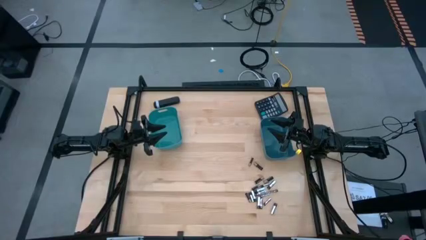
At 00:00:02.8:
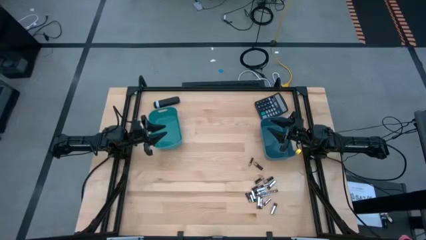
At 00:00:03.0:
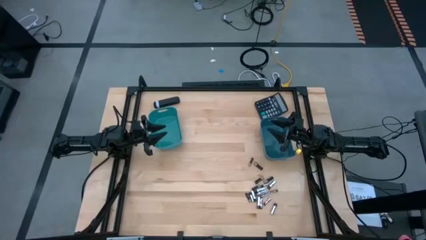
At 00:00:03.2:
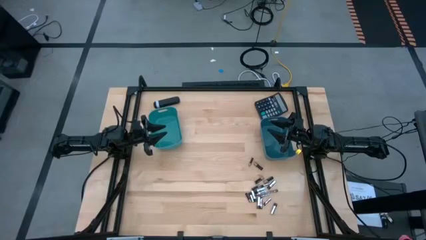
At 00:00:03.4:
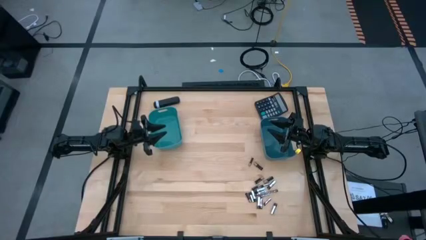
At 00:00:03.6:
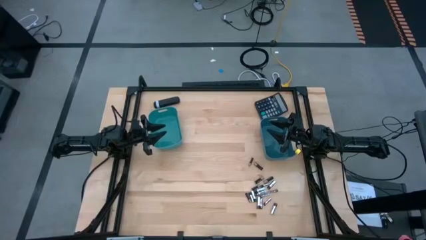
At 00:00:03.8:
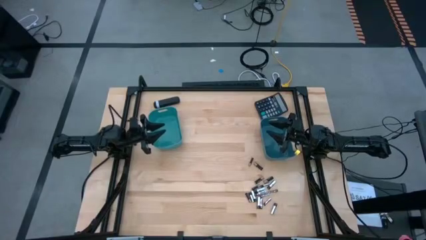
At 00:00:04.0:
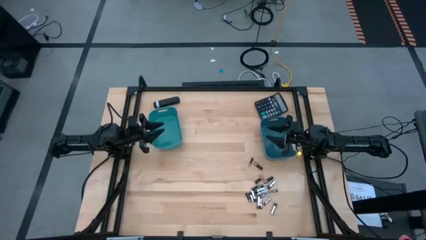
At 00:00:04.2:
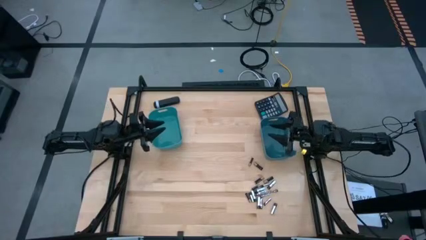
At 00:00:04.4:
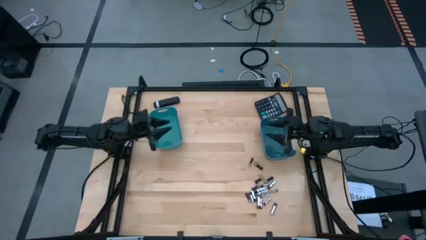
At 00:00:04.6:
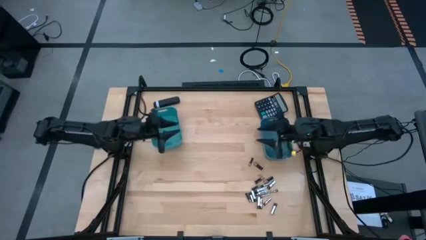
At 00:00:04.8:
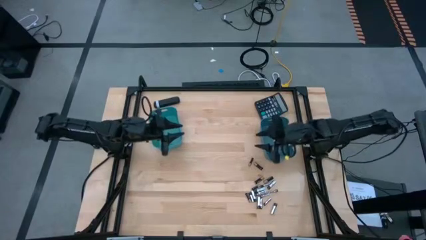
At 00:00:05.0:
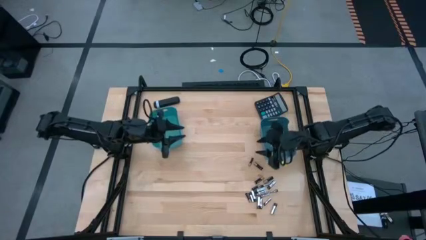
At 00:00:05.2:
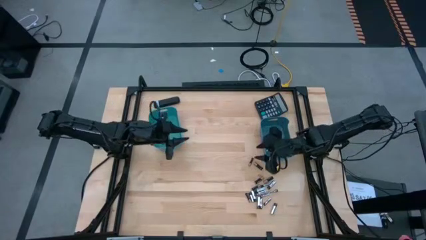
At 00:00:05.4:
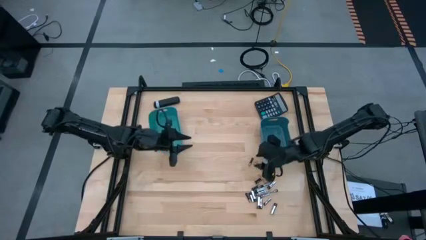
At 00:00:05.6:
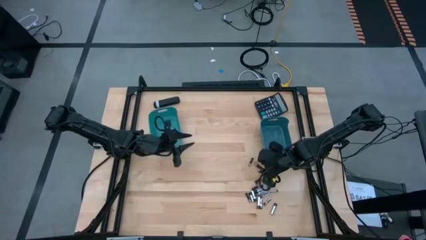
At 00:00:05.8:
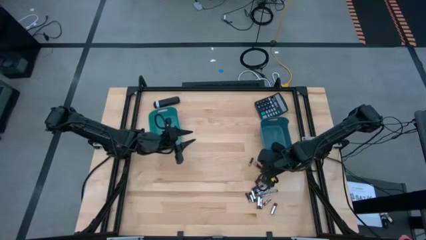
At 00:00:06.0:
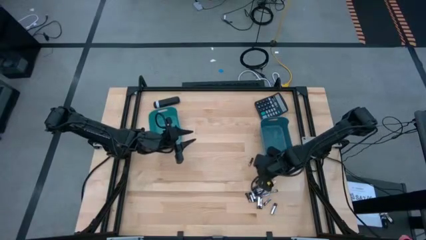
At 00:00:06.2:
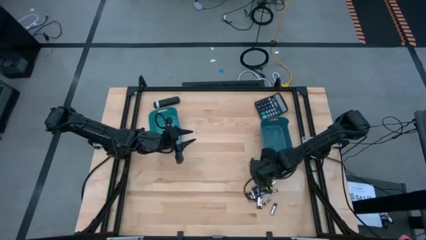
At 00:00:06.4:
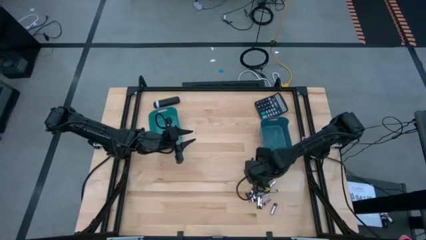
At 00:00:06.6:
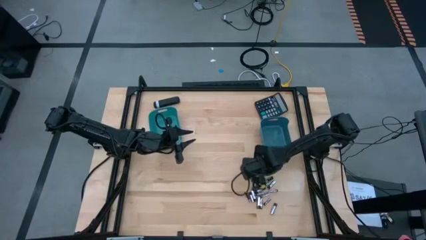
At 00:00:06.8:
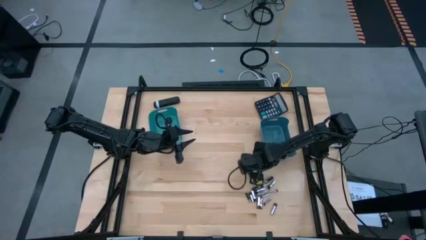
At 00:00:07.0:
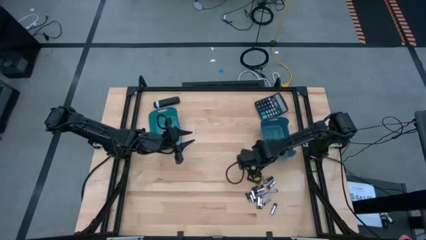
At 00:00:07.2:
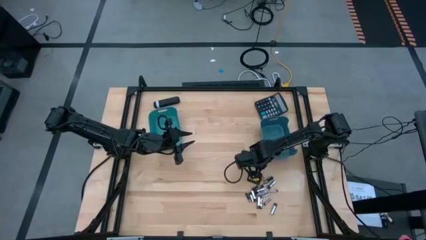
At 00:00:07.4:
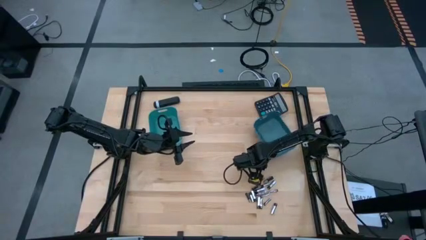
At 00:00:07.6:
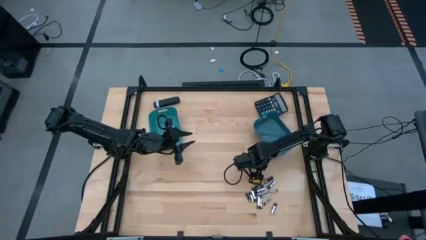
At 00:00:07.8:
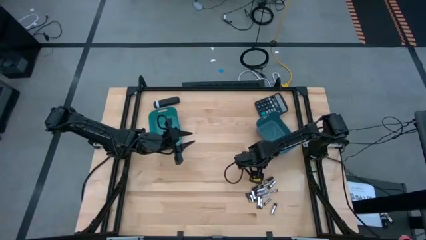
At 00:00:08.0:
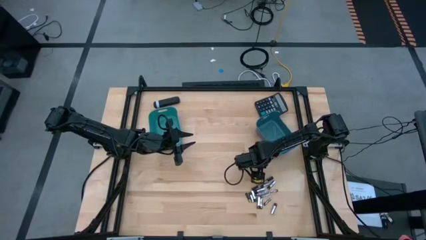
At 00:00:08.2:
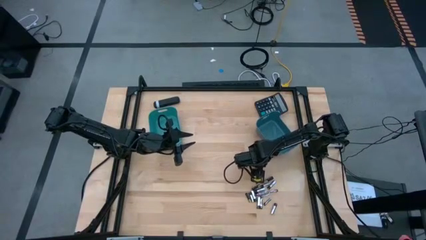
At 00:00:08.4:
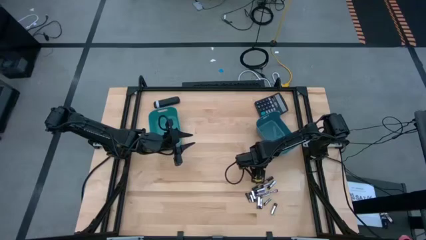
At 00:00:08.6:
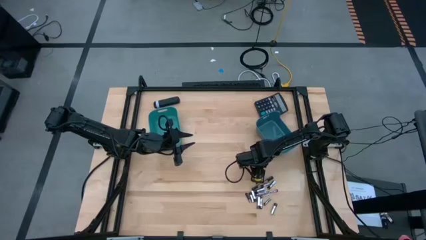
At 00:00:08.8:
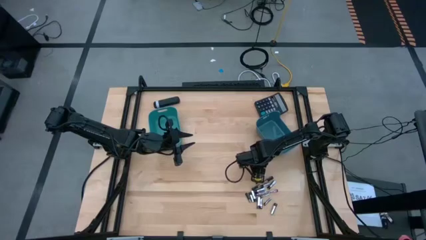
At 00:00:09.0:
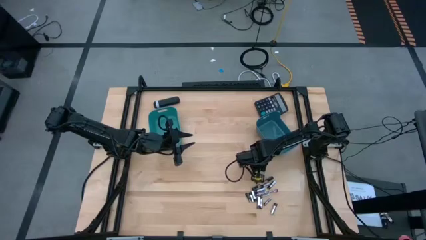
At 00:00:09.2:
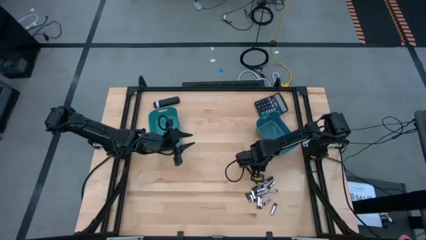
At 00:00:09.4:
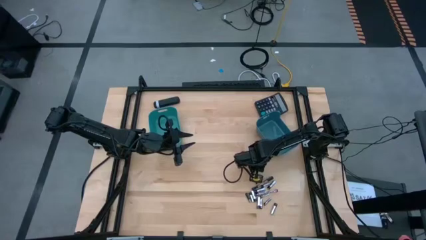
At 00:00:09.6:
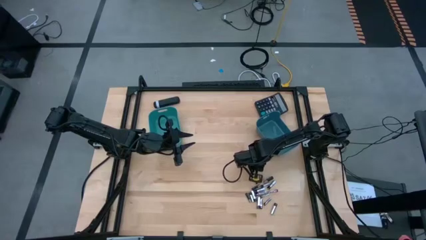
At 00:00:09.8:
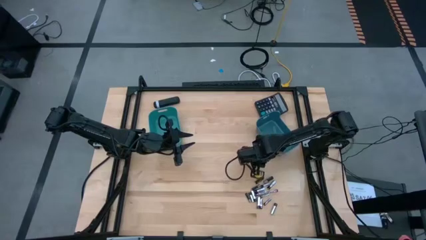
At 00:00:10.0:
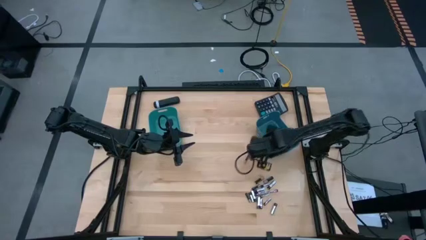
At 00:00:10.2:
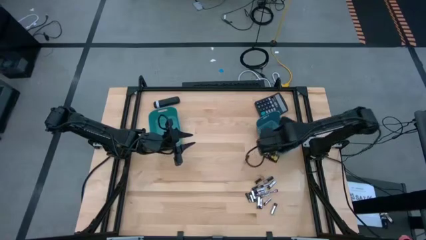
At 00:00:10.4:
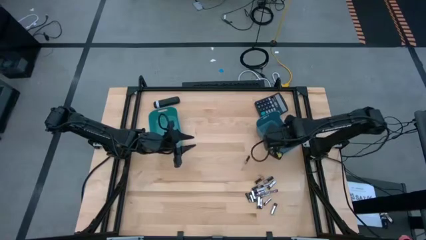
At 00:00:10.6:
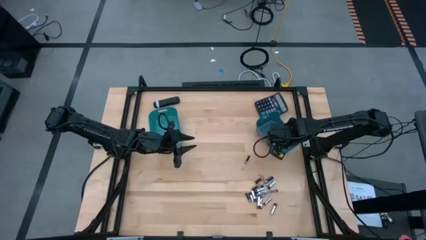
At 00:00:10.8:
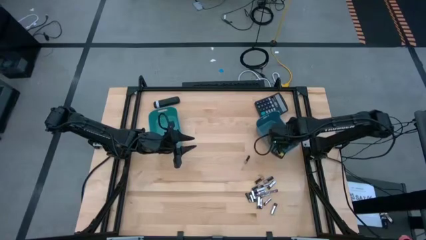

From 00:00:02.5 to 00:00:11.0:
Task: Sort batteries
Put the black battery into the dark blue bin

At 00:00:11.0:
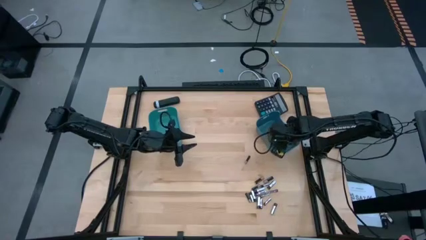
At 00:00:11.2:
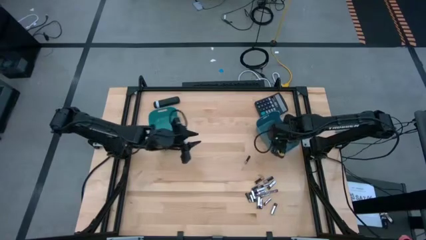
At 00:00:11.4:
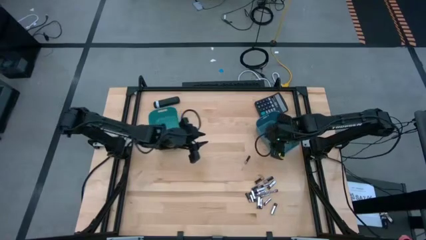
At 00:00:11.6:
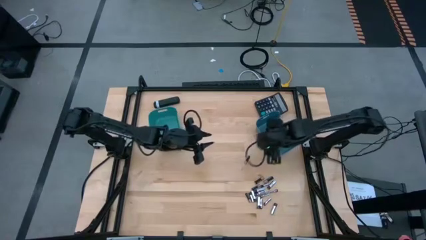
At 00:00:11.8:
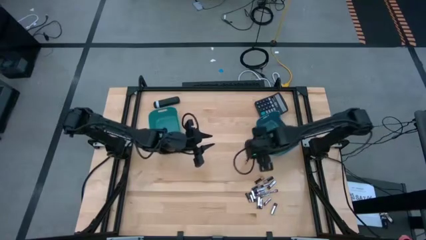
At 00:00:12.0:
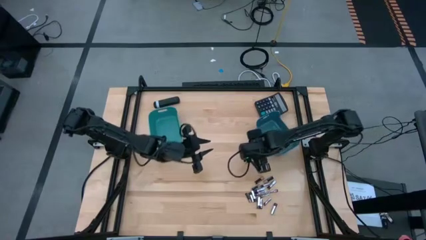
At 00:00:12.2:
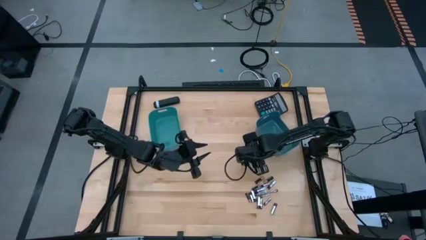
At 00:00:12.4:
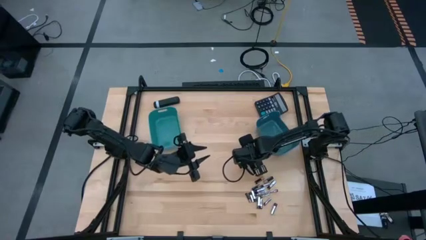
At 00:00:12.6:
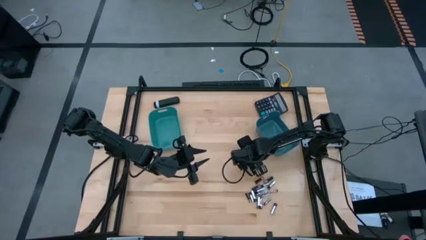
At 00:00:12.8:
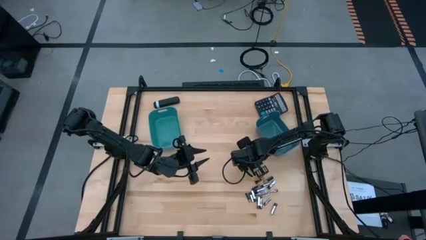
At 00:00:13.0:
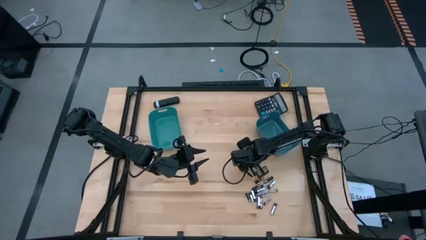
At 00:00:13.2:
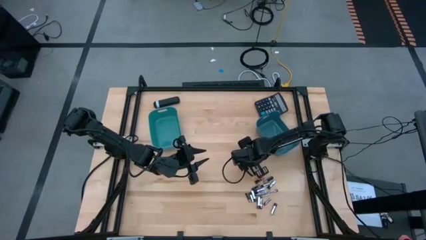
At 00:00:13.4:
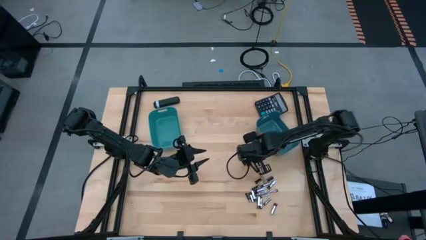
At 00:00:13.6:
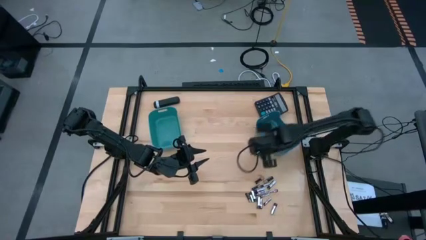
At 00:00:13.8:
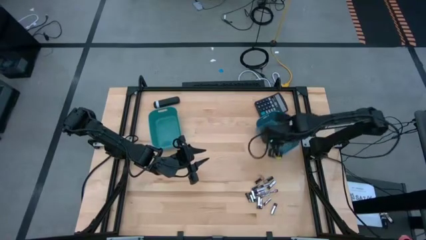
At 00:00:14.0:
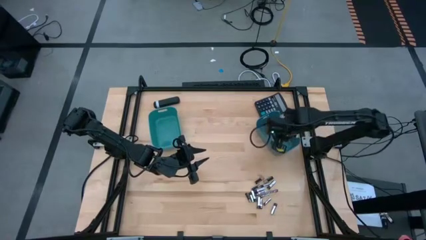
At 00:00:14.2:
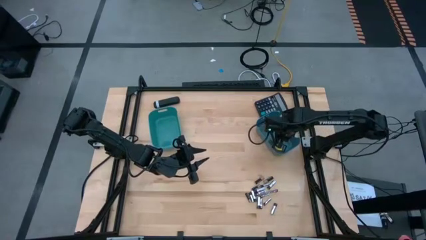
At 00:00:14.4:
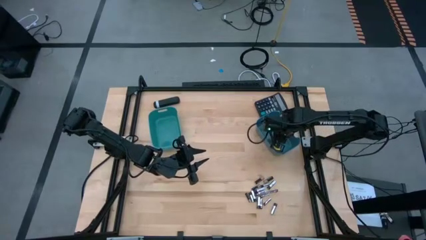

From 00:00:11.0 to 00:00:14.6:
Put the black battery into the dark blue bin

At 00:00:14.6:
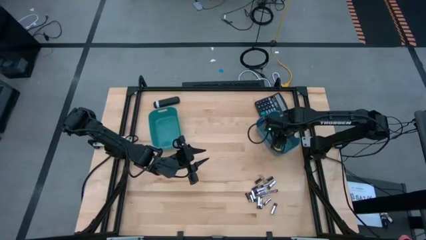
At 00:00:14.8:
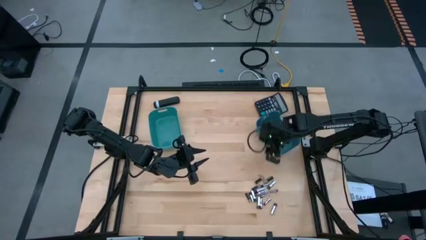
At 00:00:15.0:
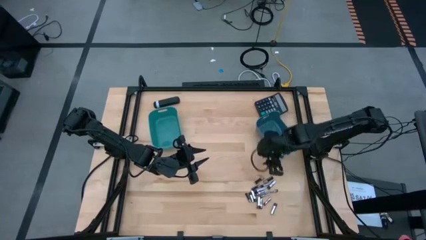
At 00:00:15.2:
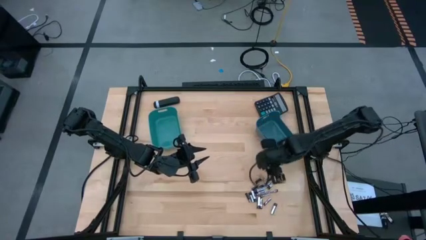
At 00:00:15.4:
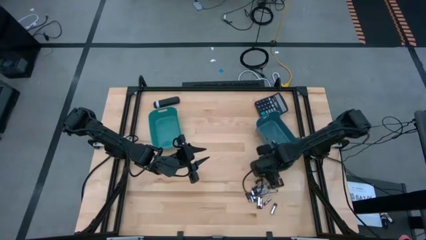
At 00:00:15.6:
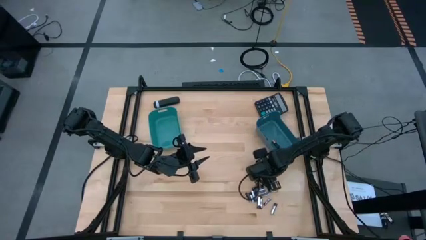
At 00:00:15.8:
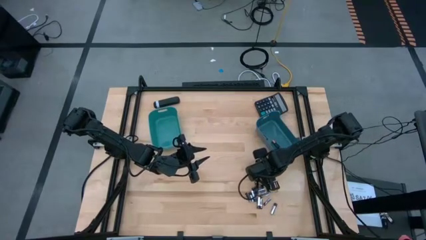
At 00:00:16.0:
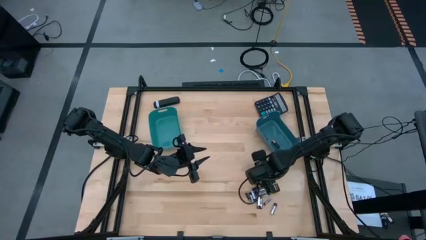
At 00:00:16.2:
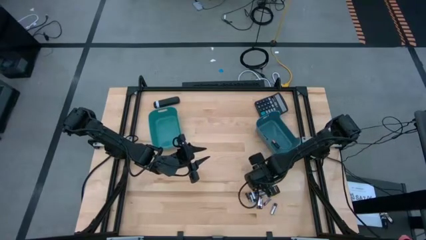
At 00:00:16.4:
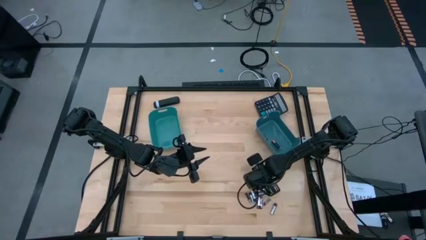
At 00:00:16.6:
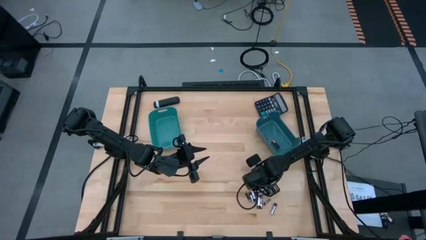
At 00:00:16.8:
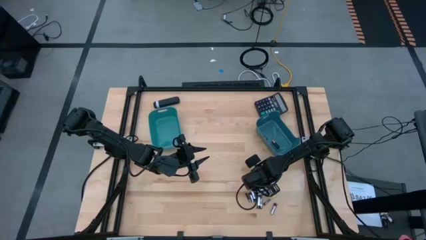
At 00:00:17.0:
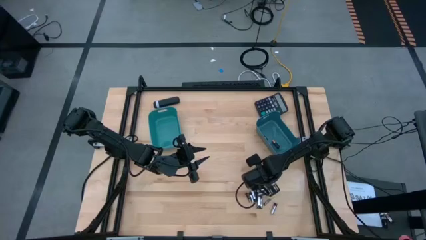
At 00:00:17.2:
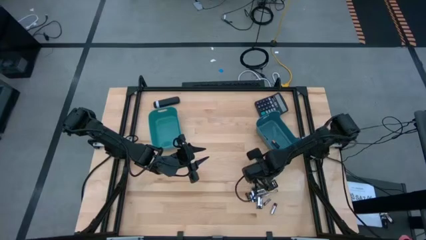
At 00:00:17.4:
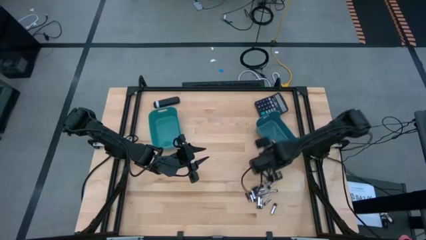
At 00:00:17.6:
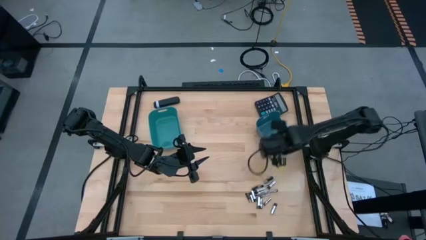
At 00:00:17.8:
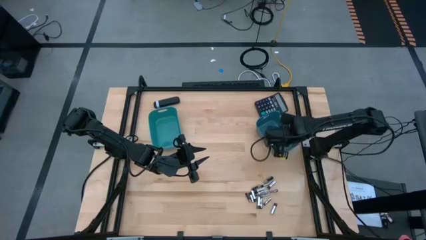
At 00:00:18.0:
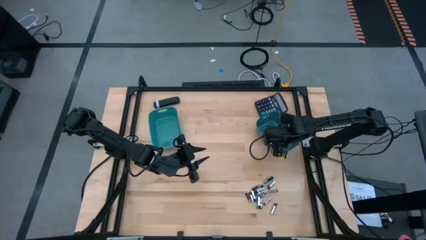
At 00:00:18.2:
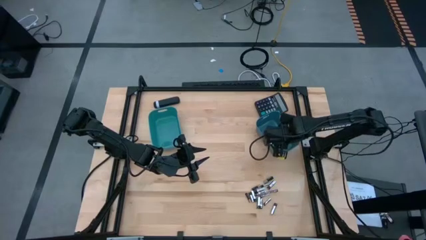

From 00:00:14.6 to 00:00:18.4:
Put the black battery into the dark blue bin
